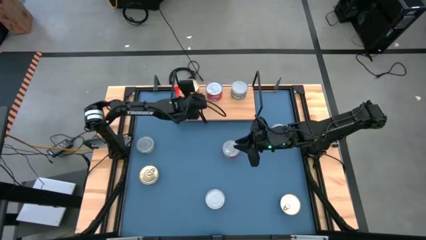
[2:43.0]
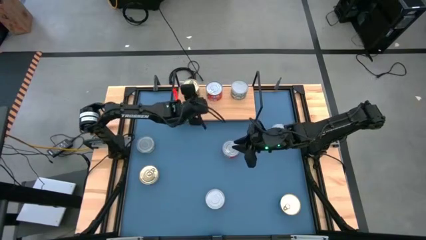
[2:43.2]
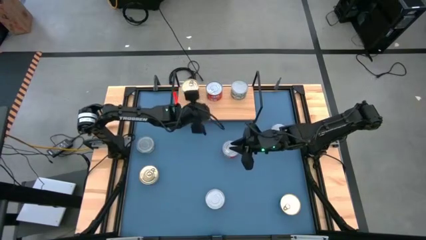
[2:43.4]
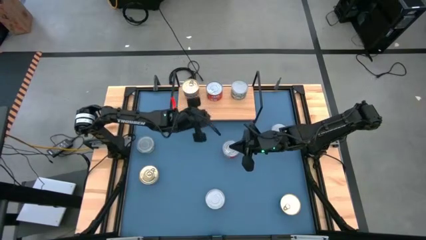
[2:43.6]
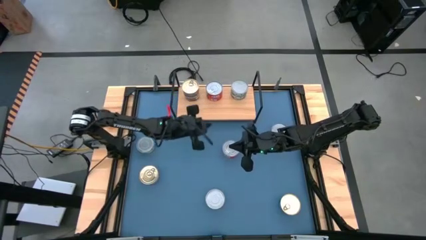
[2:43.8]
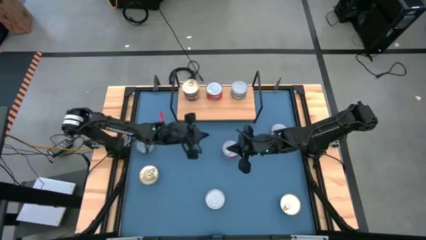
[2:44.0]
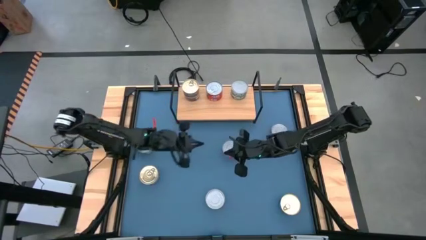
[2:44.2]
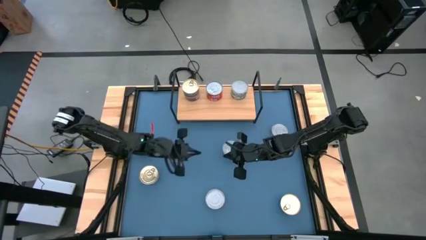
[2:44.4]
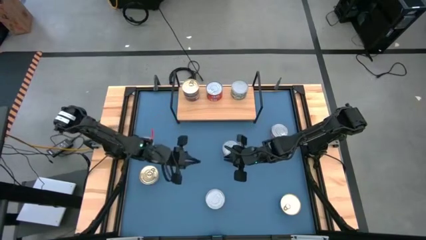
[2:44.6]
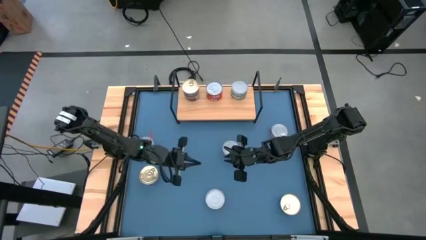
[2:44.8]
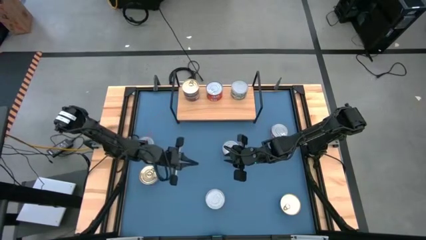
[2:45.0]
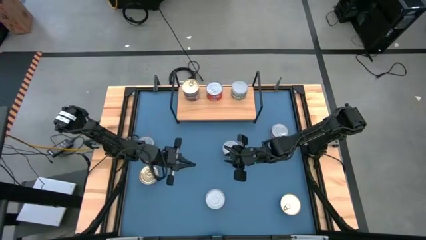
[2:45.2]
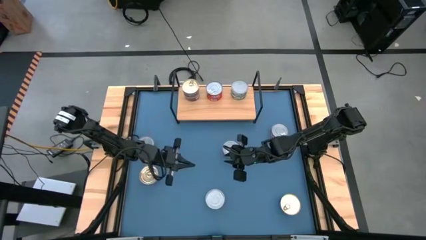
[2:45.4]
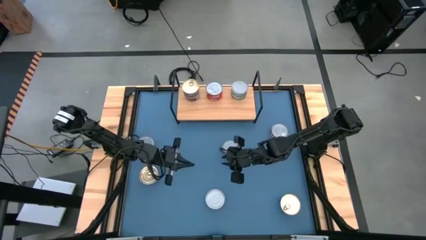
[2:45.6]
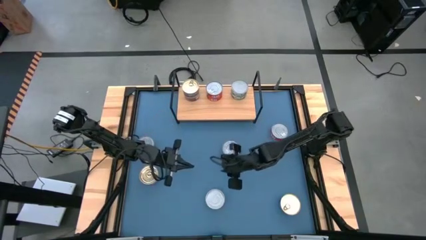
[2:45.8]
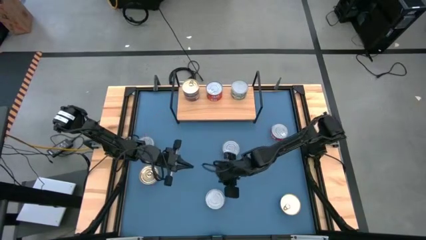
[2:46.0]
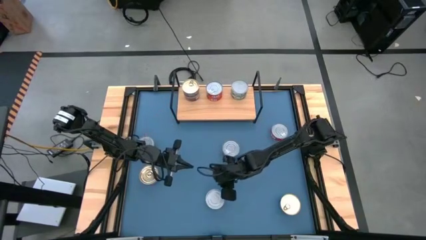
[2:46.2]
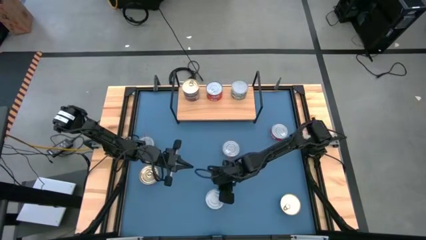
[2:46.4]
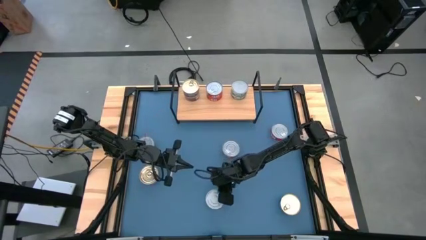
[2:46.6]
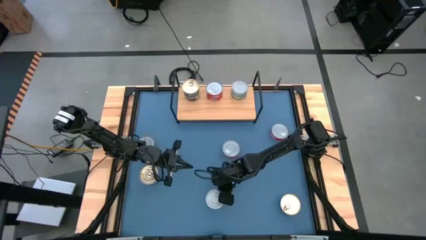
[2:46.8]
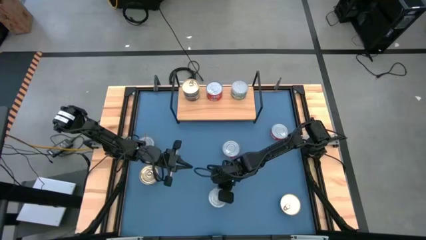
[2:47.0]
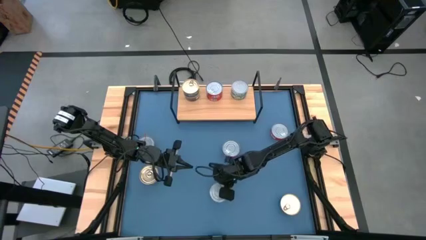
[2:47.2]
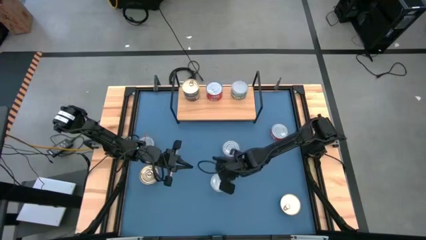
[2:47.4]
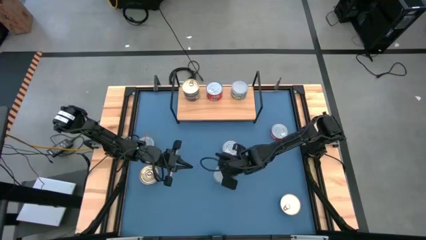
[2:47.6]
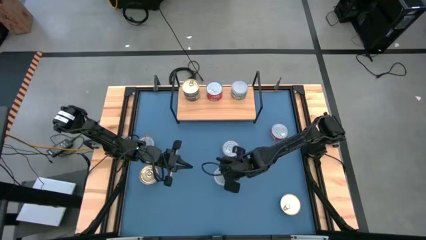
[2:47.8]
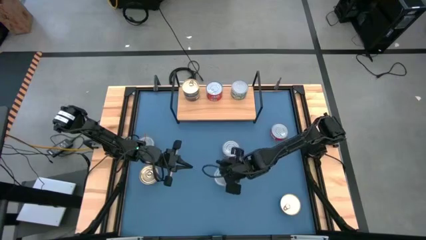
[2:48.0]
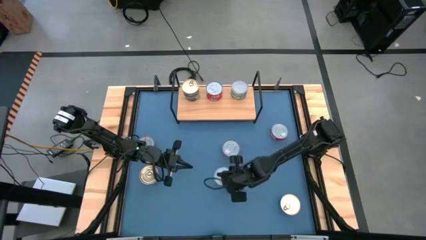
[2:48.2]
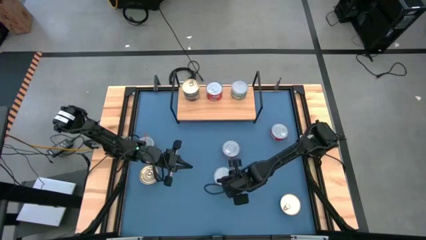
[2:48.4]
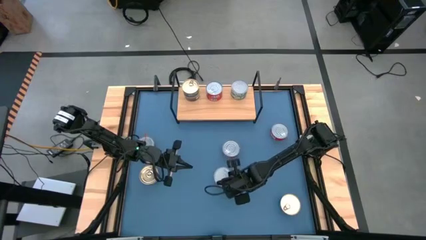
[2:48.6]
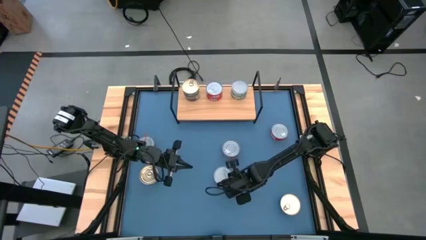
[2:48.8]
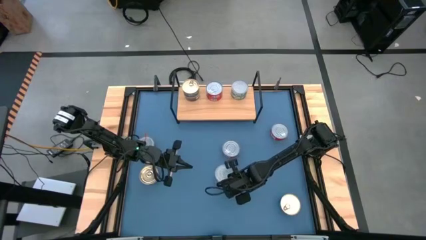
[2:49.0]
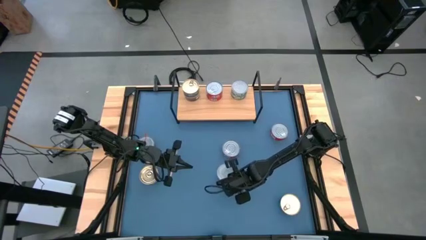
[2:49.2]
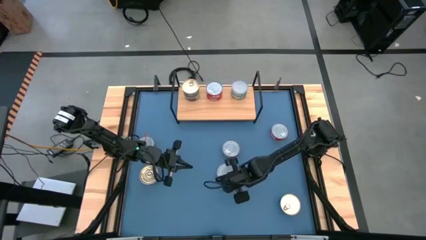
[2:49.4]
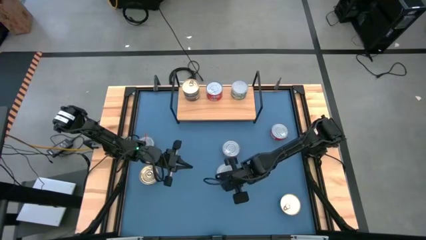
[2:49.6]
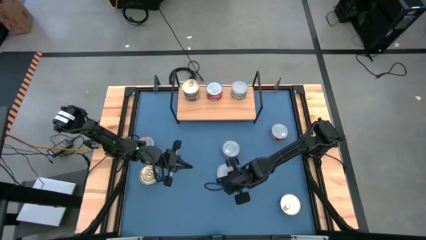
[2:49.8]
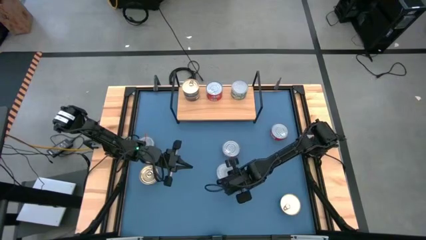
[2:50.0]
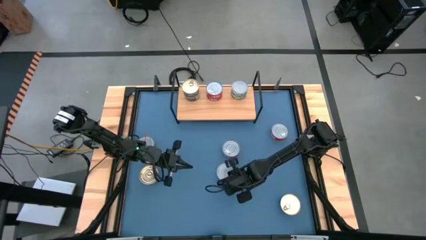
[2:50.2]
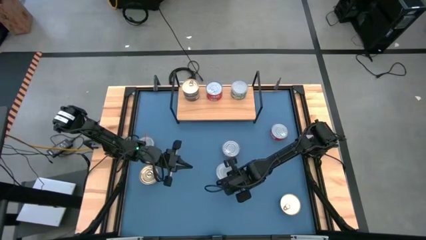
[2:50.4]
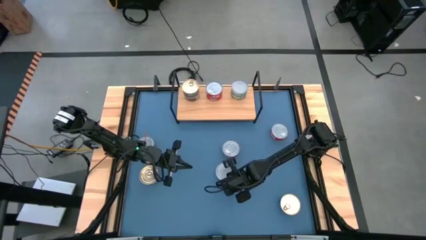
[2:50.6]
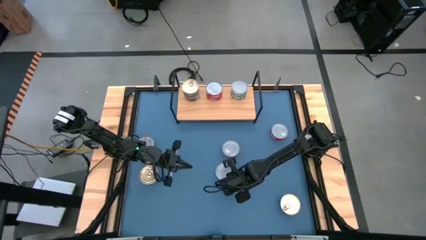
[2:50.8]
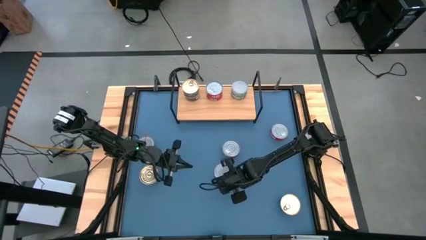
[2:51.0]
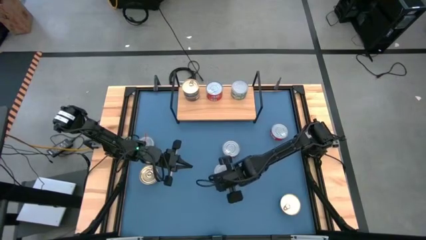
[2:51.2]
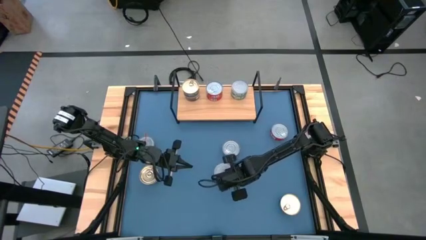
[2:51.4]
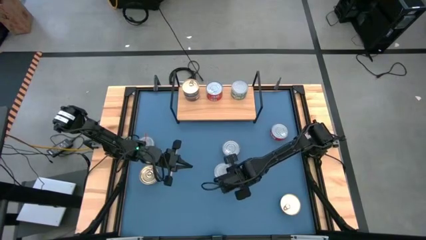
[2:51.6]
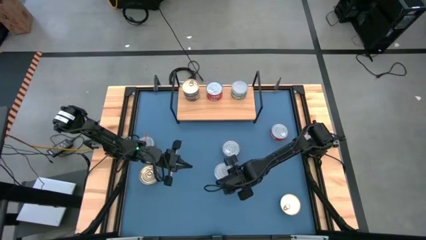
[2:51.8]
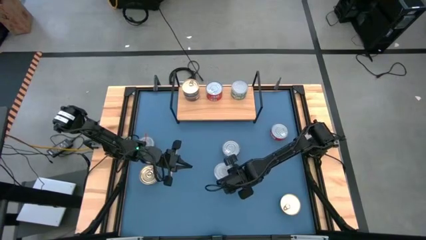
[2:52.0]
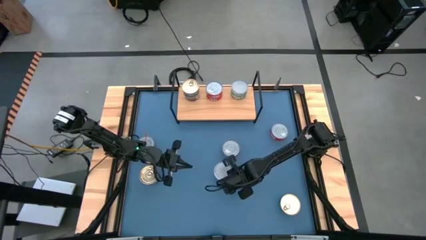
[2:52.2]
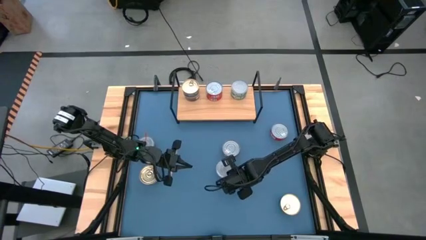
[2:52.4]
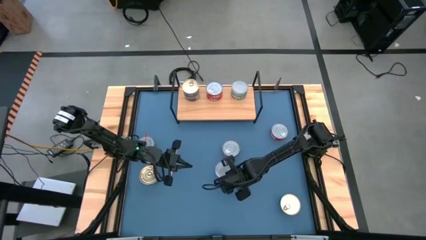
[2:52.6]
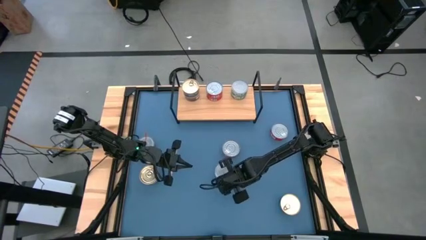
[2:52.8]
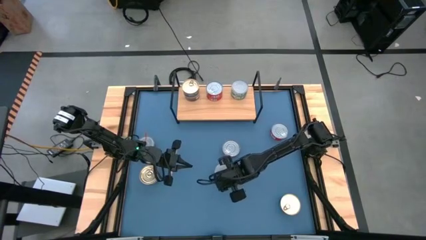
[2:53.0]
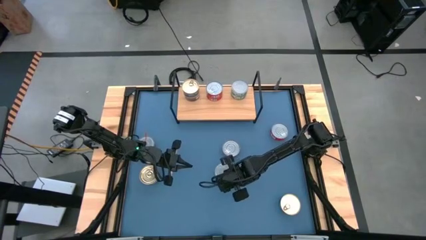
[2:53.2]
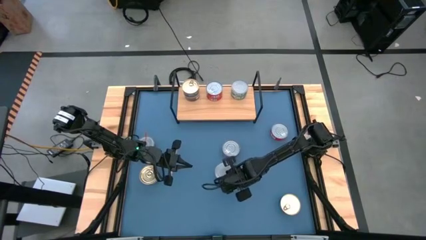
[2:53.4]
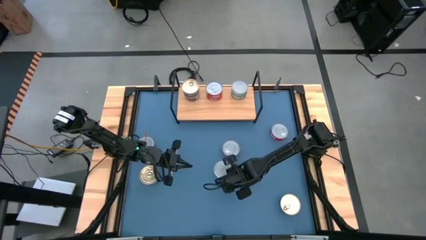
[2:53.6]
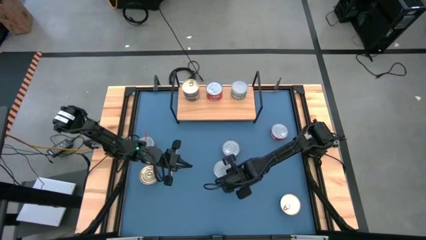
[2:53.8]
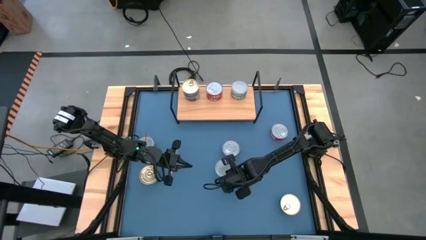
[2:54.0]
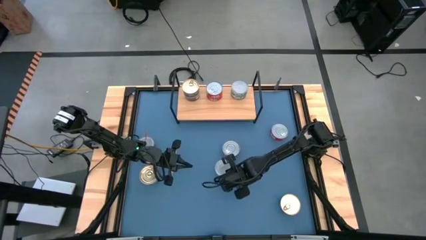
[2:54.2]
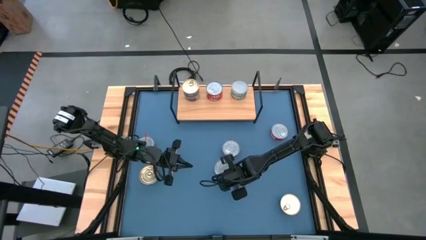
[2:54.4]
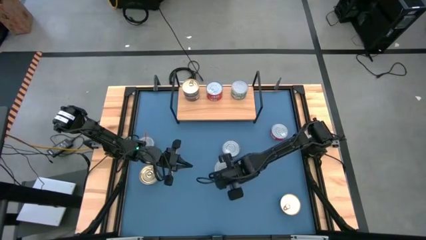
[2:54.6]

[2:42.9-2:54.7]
Task: Stack canned seafood by type on shelf
Put the green tuna can on the shelf

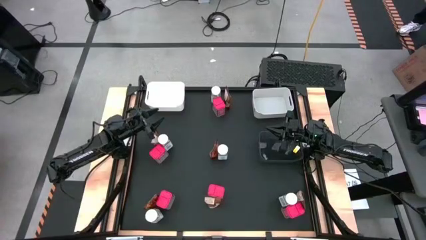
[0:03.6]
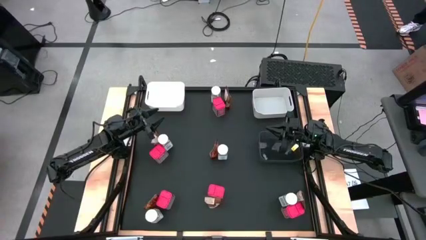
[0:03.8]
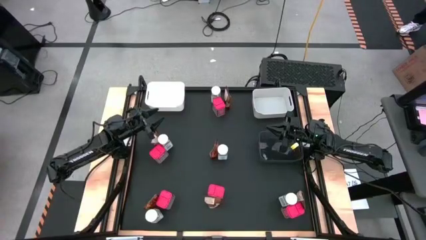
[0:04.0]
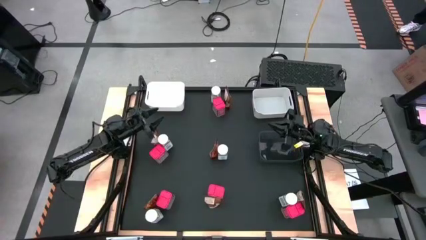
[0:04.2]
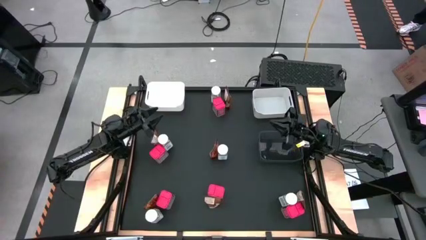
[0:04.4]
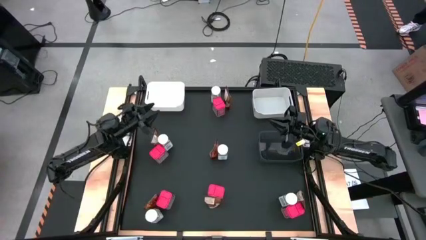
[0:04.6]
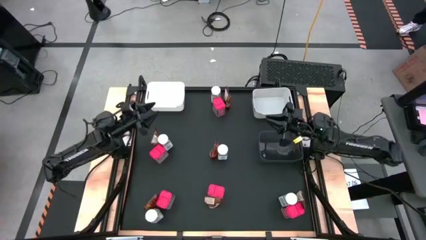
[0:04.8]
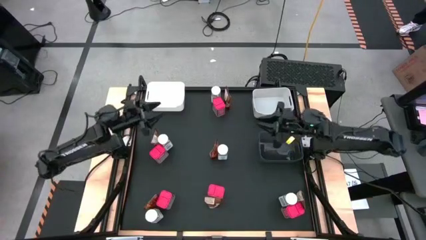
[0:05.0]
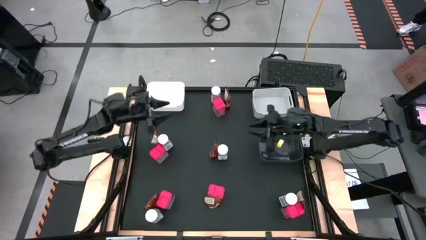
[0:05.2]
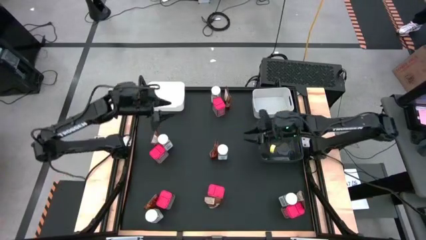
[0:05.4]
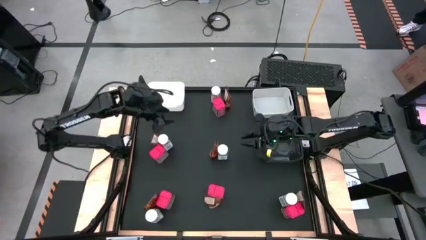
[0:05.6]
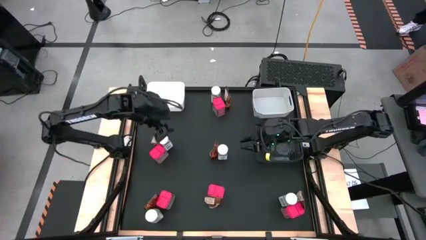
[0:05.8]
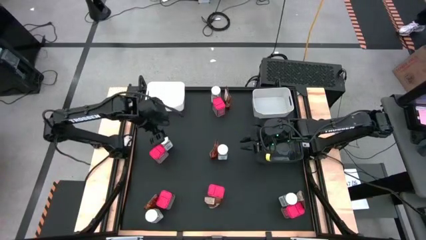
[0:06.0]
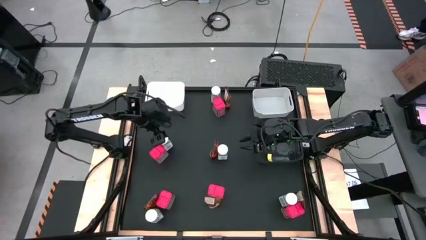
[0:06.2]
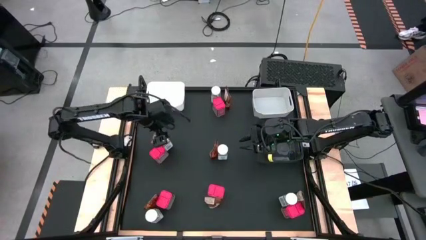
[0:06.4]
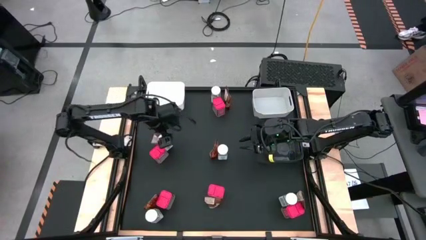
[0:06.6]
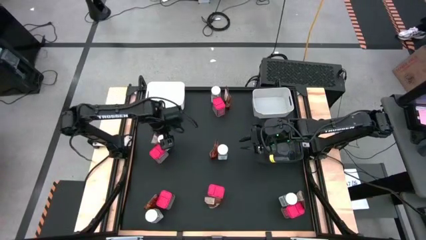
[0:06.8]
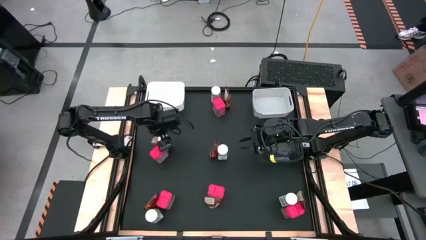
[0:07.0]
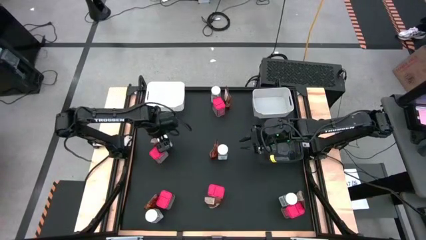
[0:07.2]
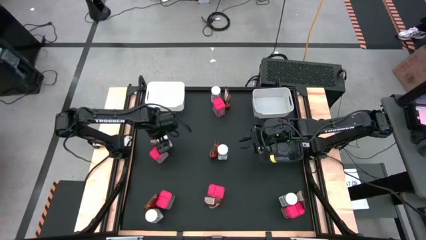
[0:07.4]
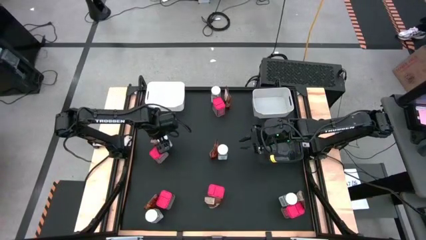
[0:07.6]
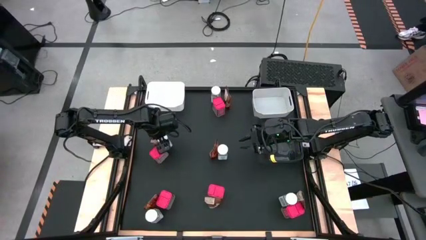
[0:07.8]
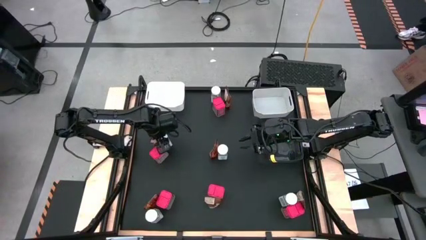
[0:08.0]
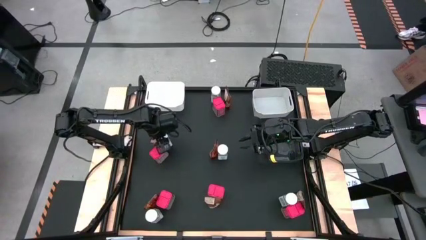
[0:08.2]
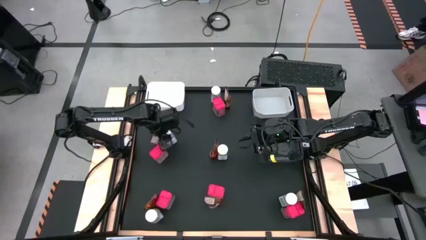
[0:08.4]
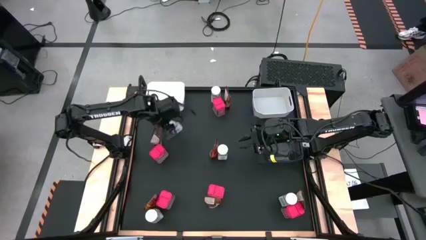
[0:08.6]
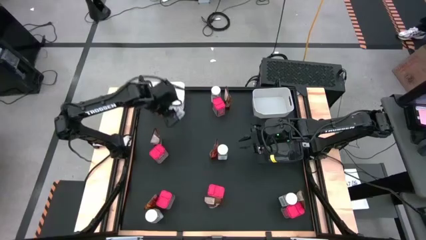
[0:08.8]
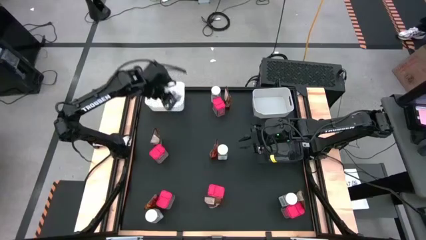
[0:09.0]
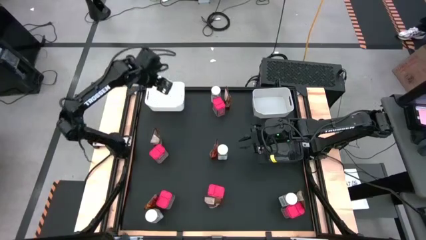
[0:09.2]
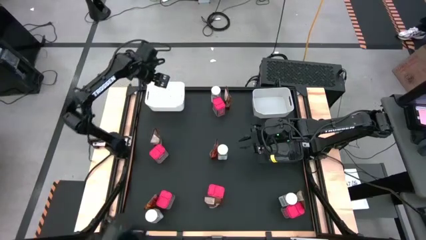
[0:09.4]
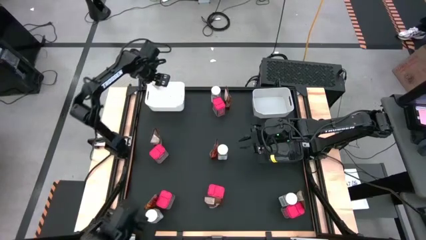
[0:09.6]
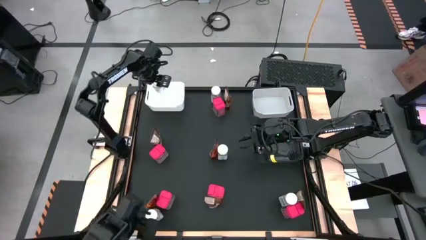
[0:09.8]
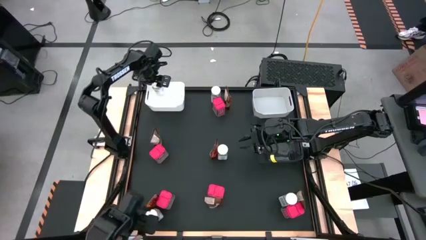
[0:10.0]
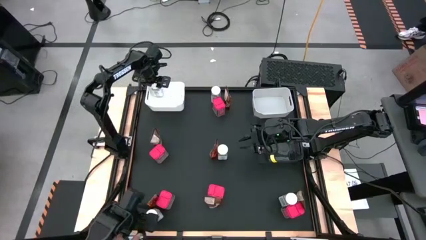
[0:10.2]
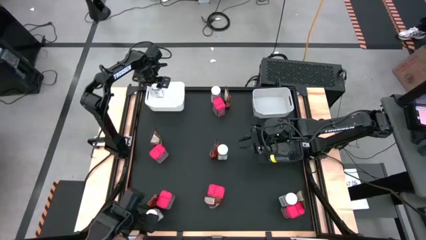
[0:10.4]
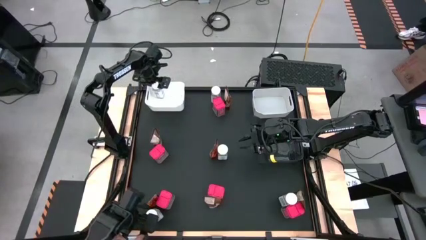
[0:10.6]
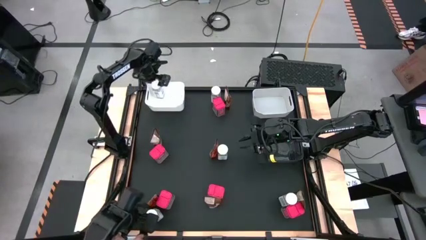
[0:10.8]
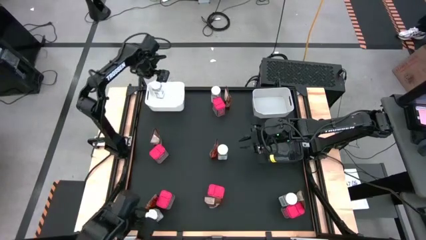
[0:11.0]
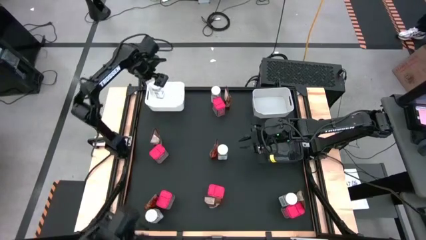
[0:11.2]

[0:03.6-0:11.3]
Task: Sort spices by type
Put the white seasoning bottle into the left white bin
